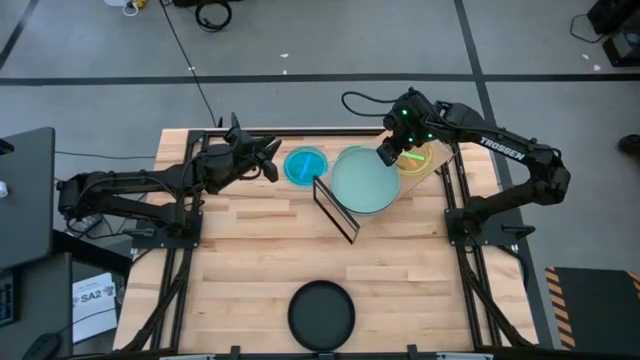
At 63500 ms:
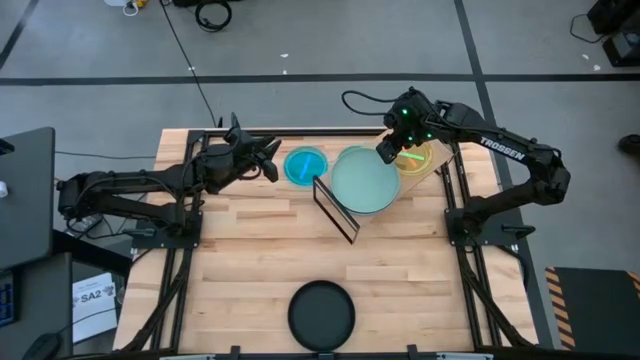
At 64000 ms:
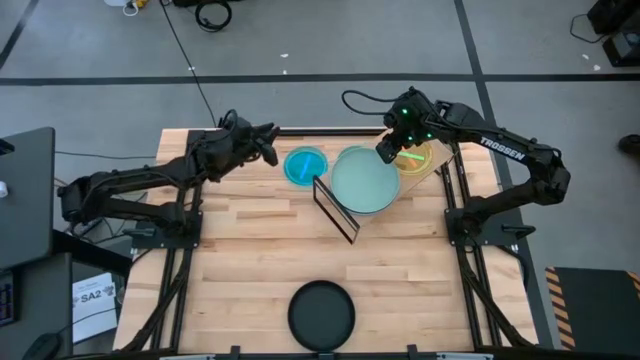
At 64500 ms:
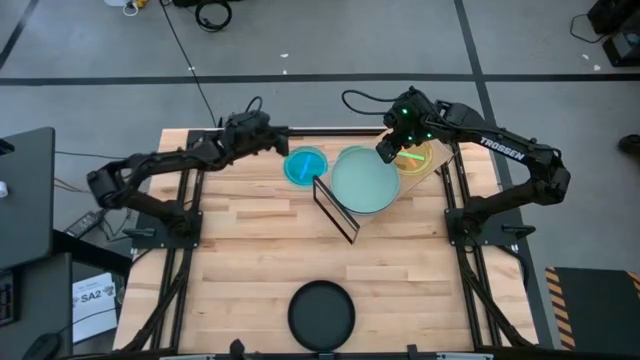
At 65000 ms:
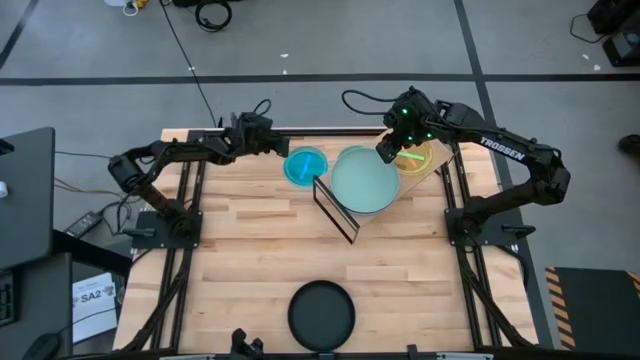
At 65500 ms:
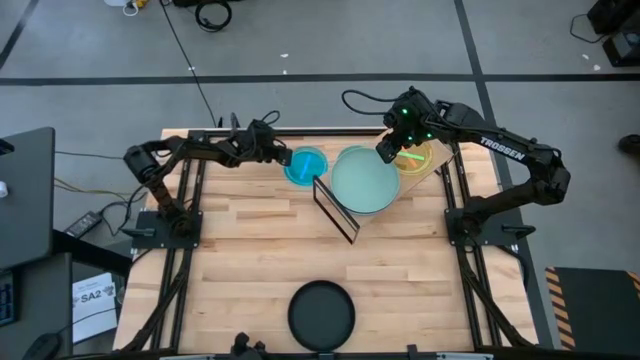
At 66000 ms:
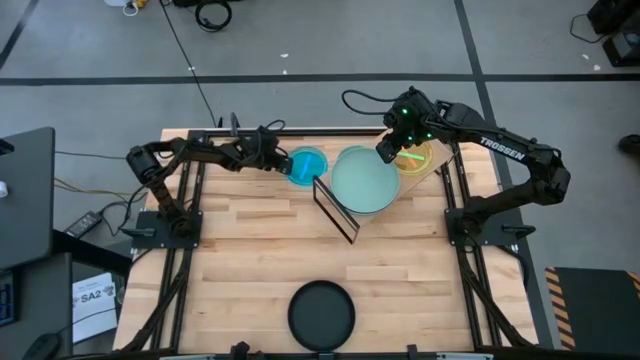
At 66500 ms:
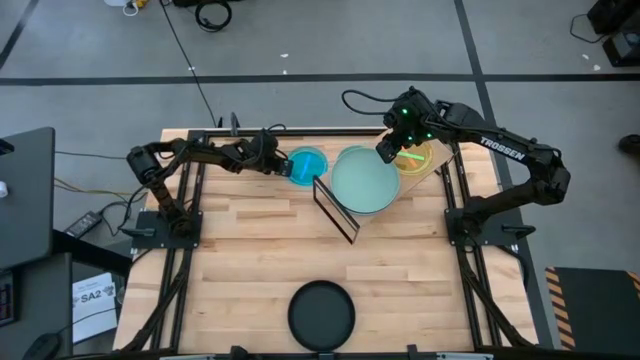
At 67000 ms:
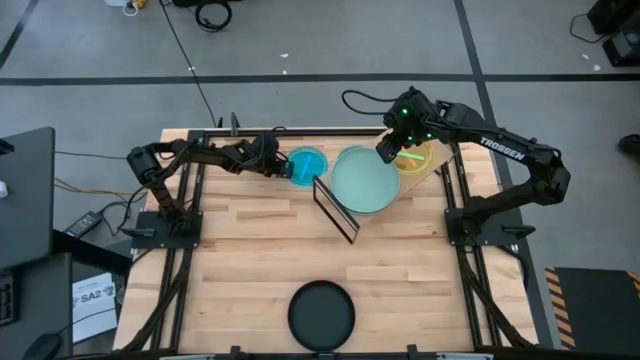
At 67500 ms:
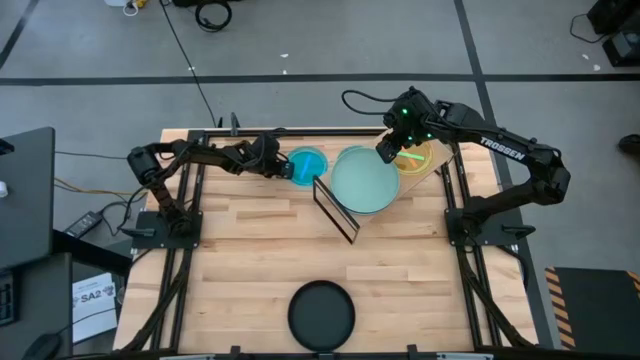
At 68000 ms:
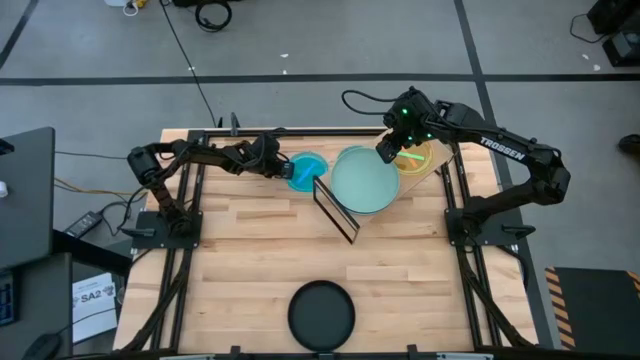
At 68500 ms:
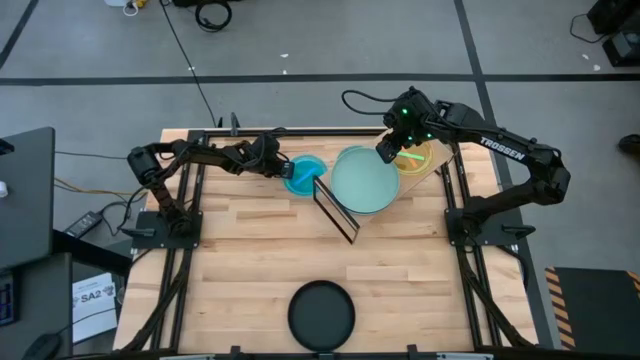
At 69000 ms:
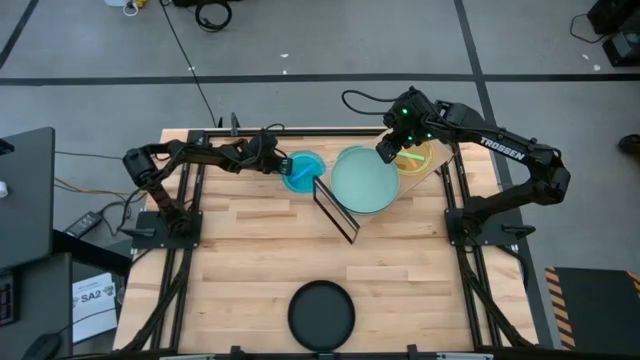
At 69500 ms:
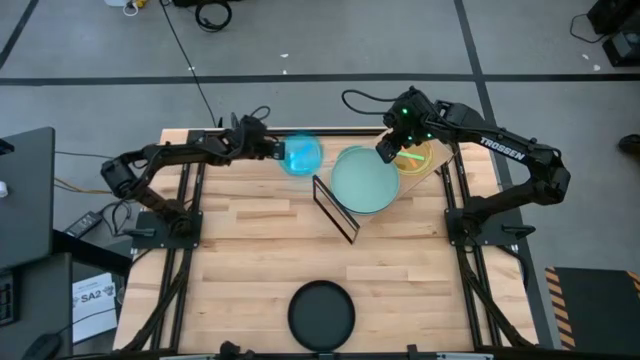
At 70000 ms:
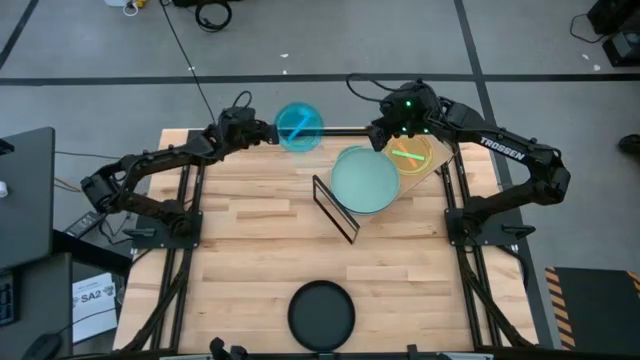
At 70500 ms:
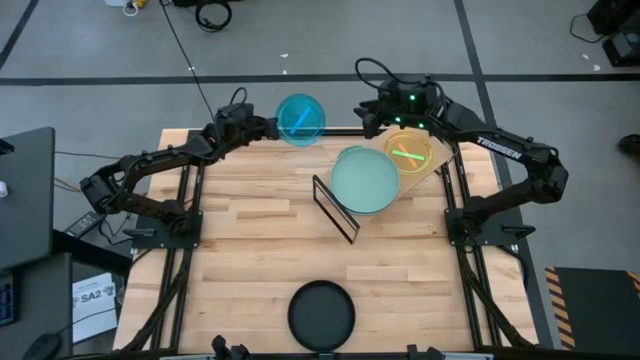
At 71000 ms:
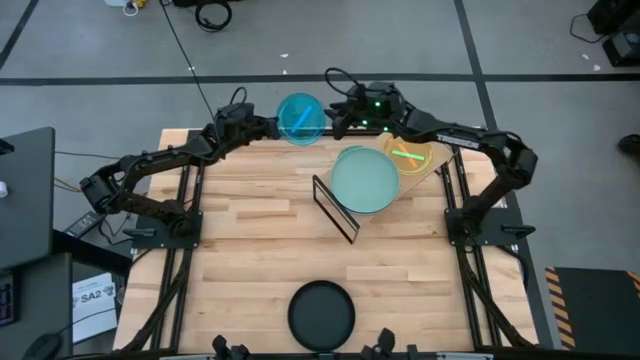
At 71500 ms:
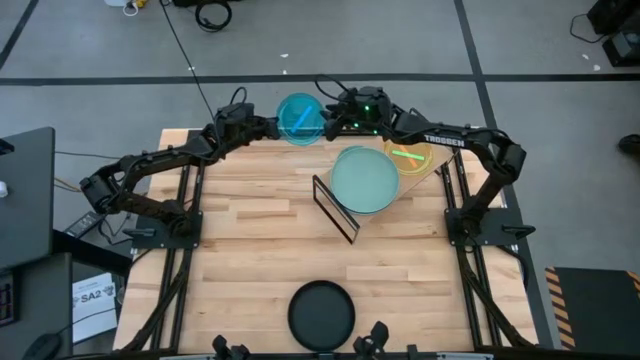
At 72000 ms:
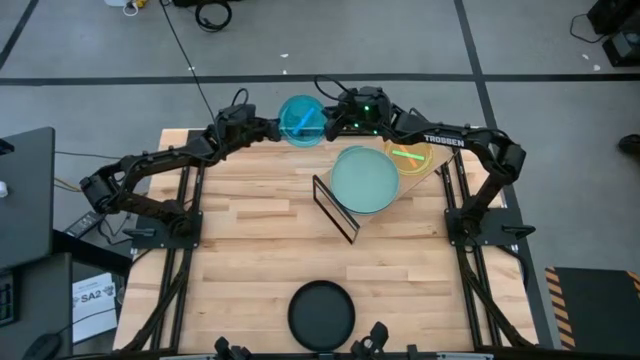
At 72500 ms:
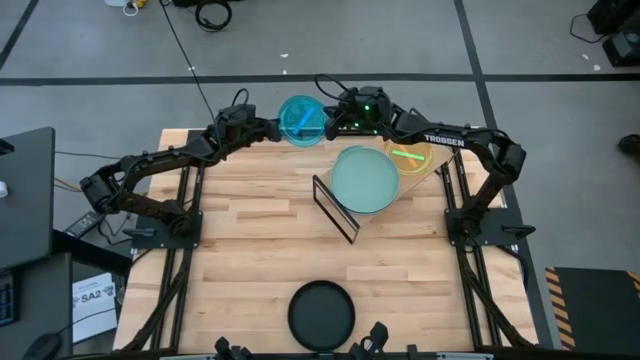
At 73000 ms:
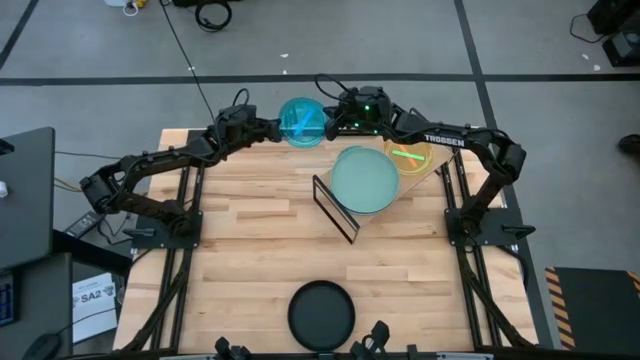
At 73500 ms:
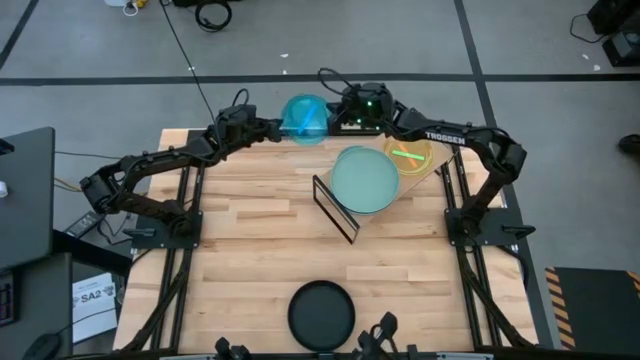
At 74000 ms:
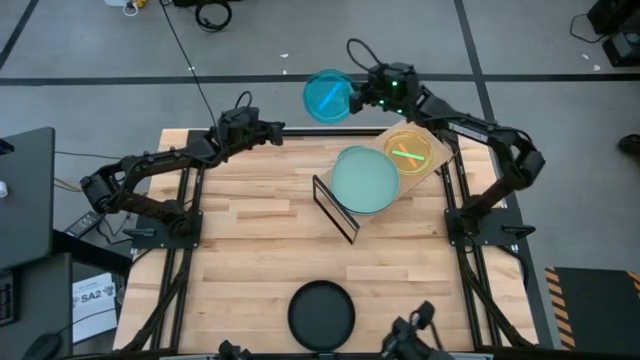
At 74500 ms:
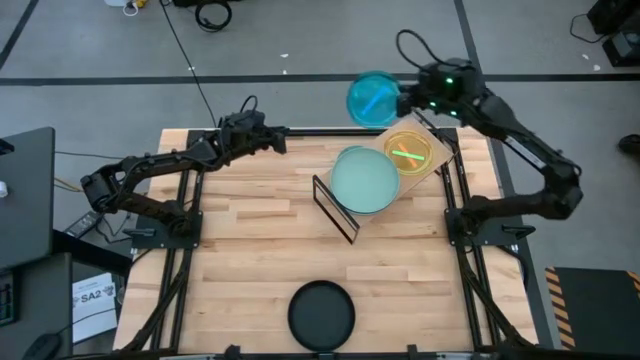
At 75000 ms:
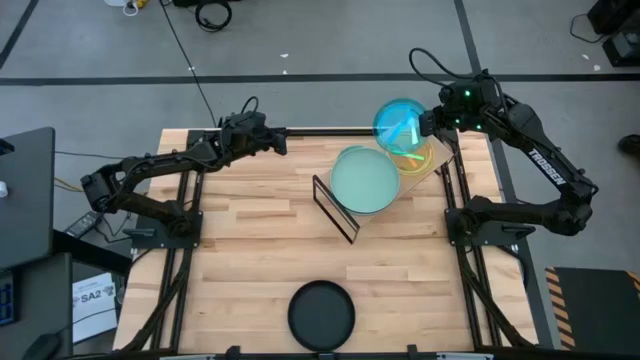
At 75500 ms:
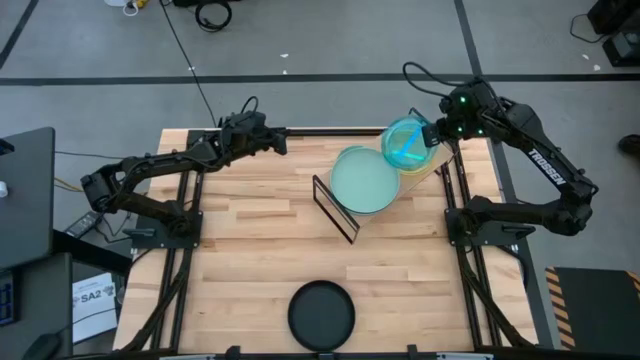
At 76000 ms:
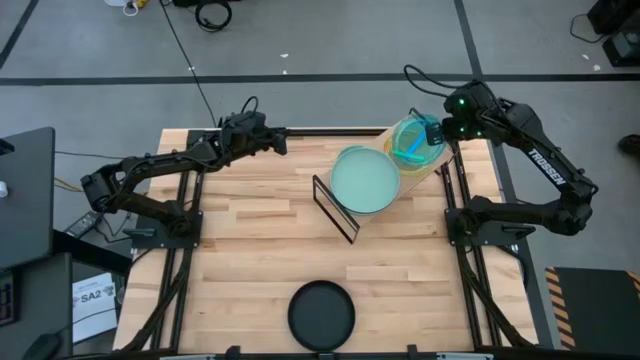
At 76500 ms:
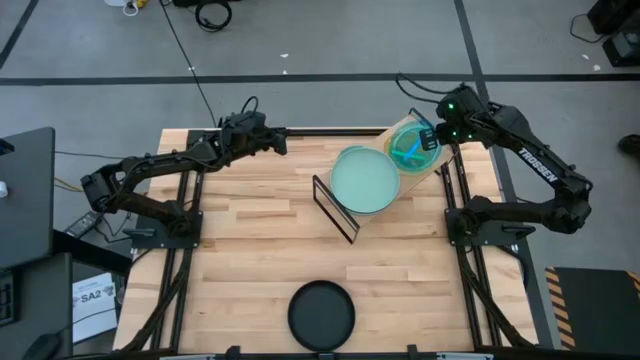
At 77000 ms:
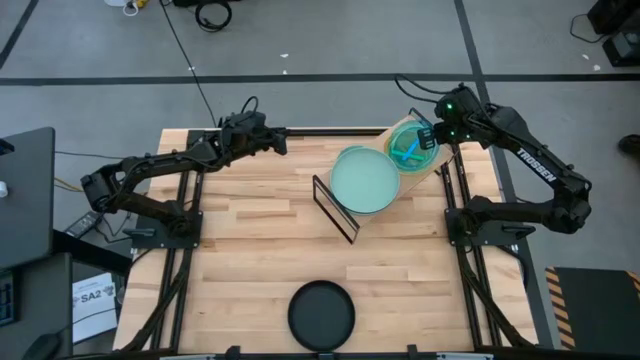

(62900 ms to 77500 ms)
Task: Place and stack plates onto a shelf
Stack the left small blue plate on top of the small green plate on the shelf

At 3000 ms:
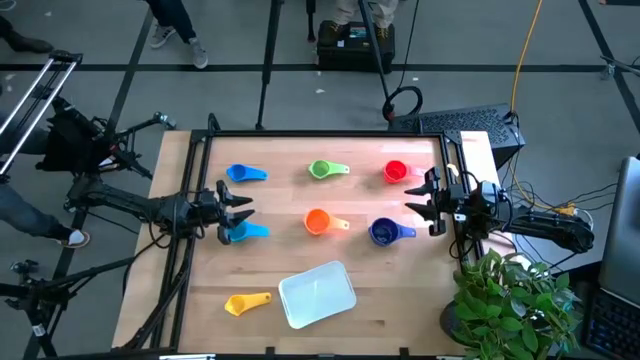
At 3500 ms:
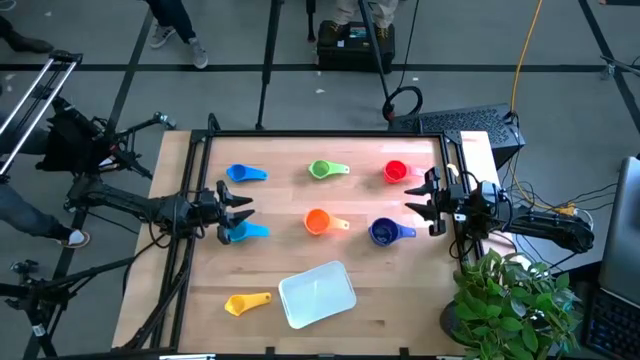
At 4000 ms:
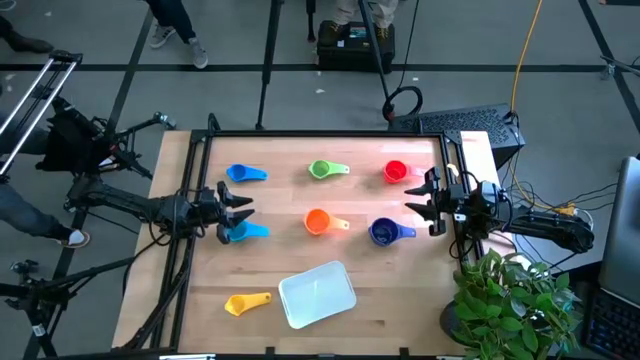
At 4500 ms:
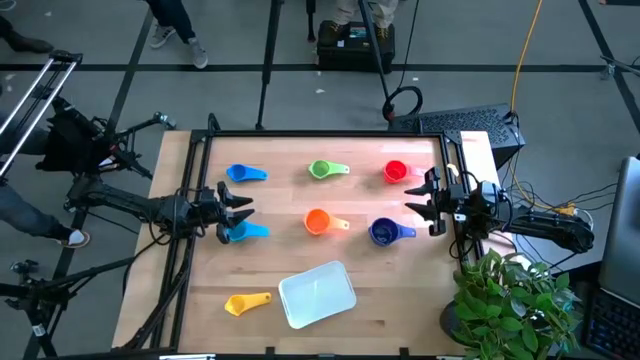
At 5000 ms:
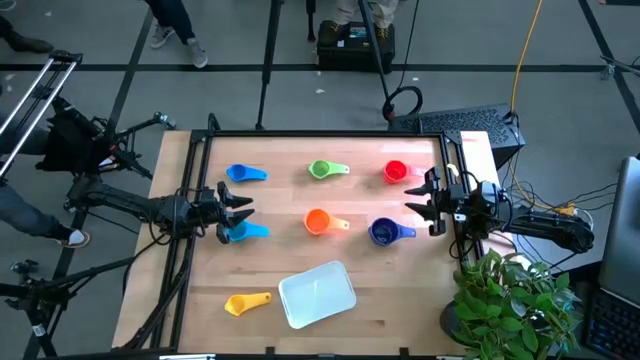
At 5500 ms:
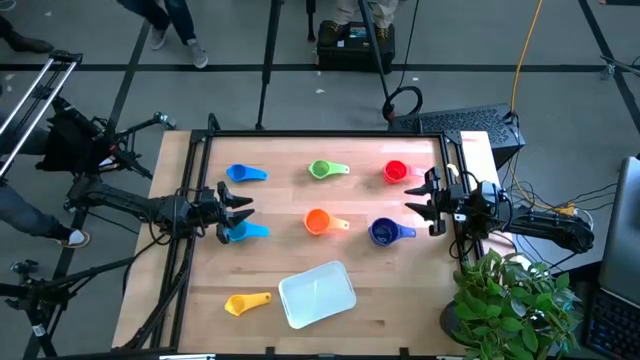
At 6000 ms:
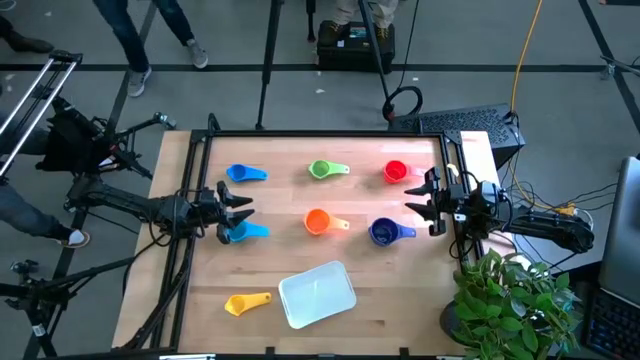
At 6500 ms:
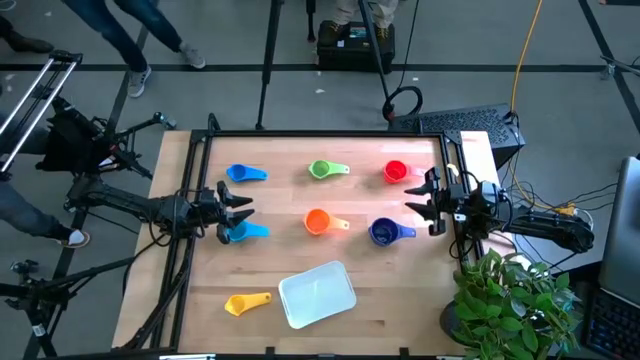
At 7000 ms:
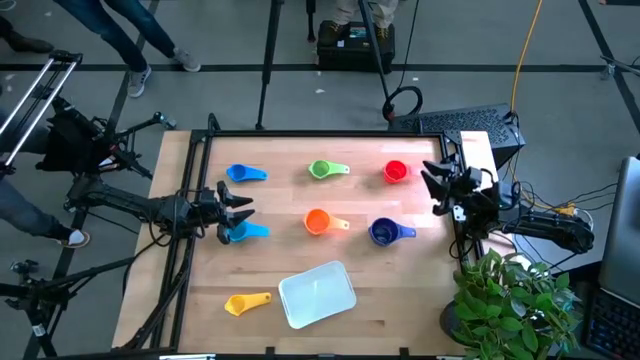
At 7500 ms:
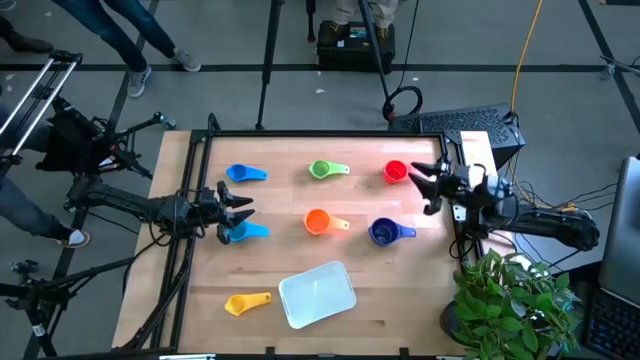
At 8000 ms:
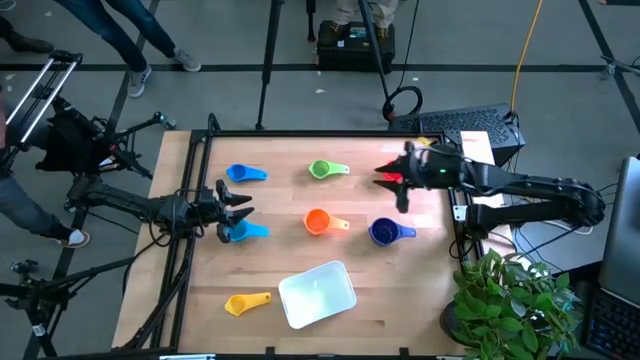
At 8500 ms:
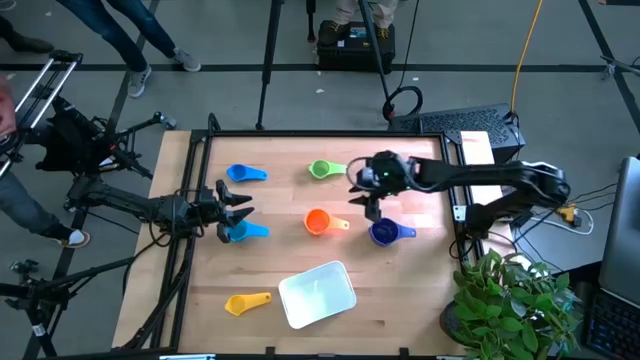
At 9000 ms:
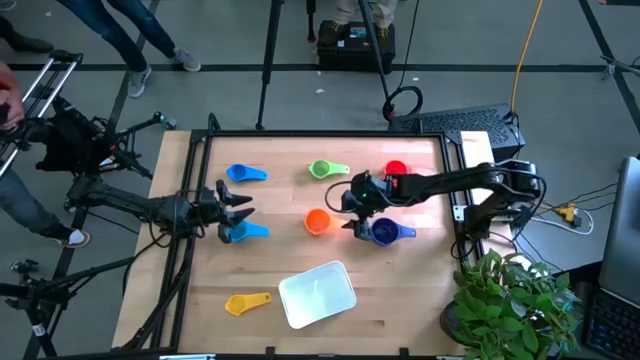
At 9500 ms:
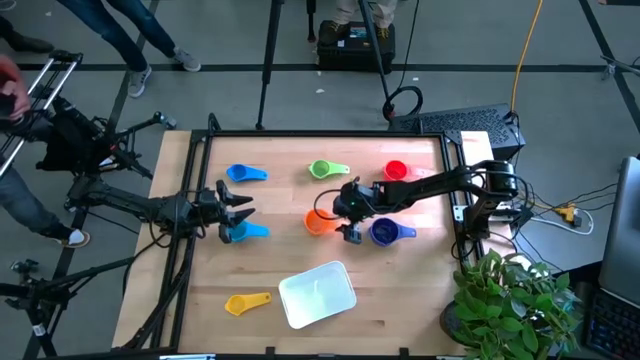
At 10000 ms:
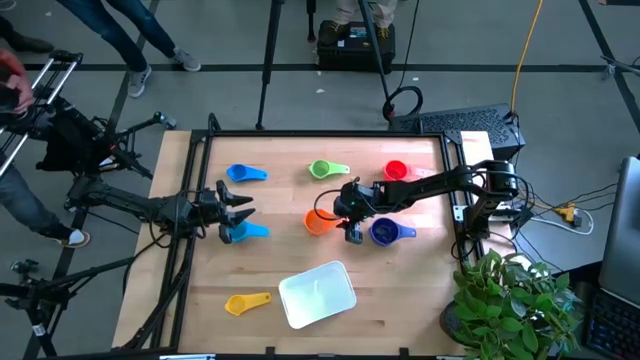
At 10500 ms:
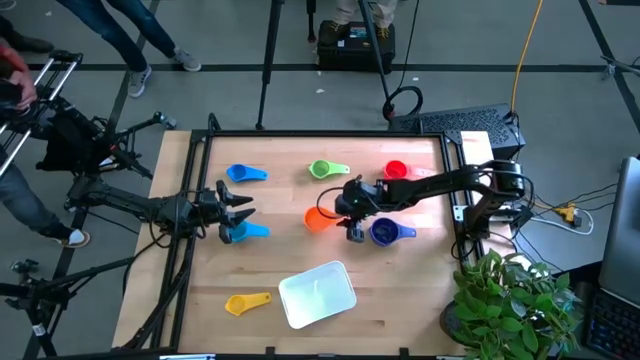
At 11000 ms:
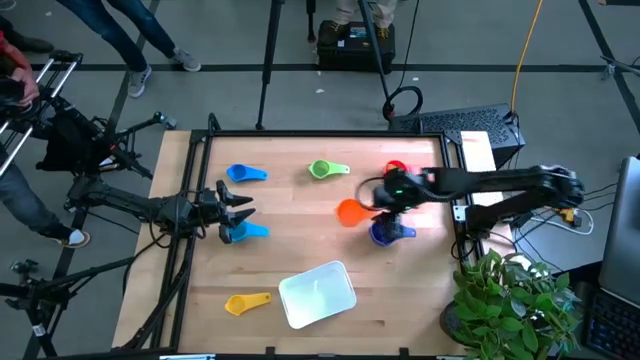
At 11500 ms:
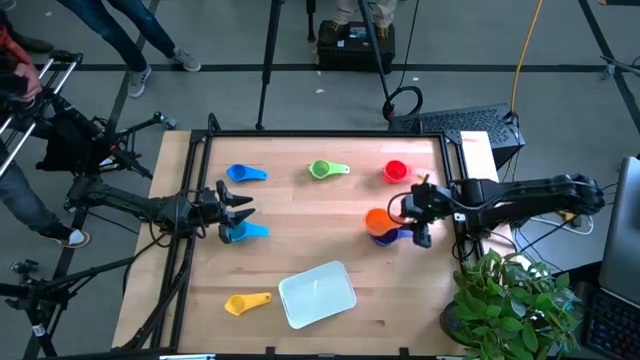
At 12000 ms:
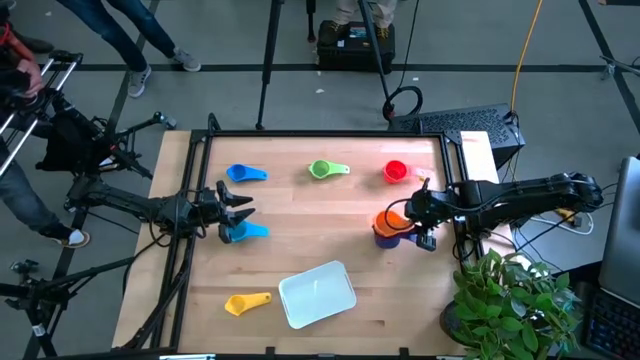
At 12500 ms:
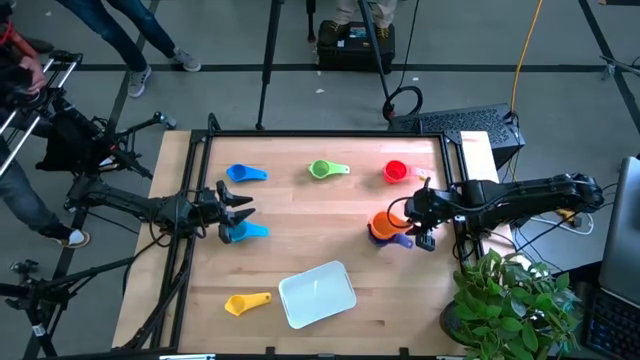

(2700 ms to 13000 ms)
Task: Nest measuring cups in basket
Stack the orange measuring cup on the violet measuring cup
